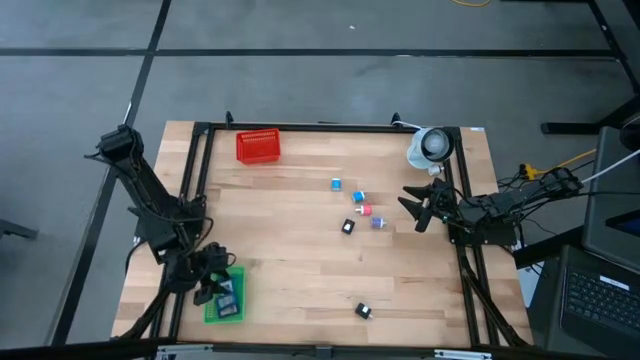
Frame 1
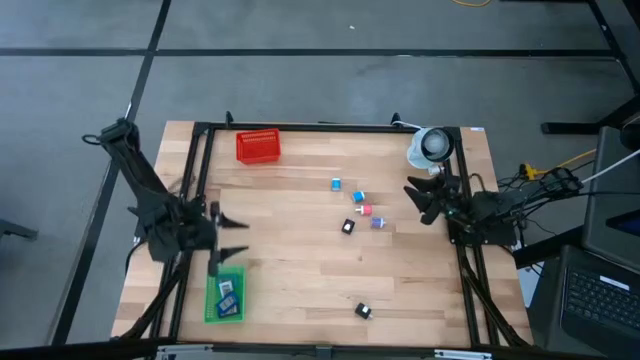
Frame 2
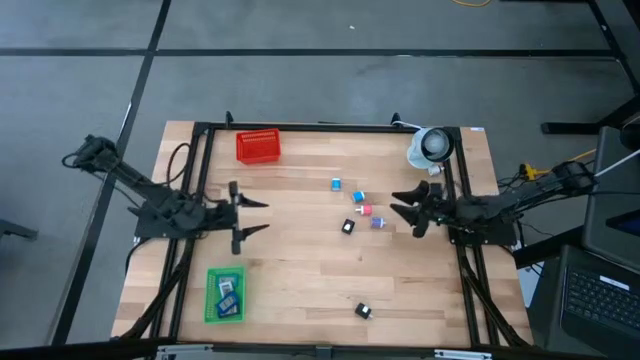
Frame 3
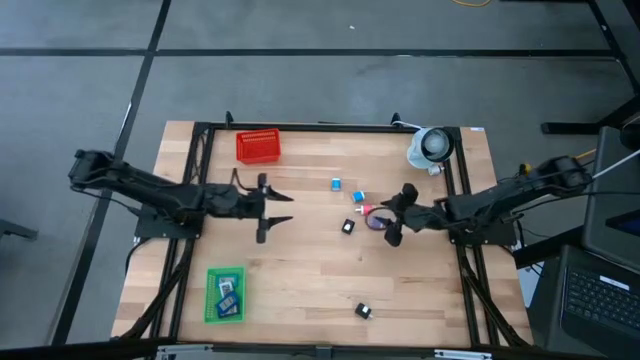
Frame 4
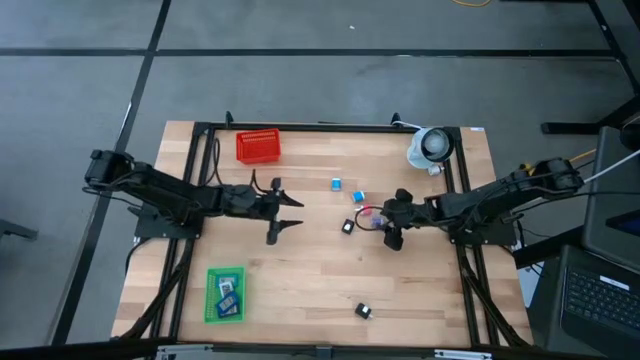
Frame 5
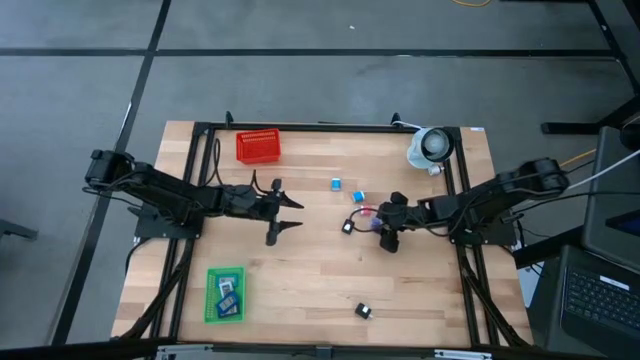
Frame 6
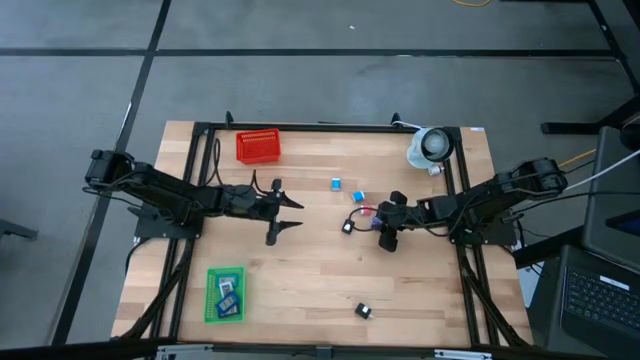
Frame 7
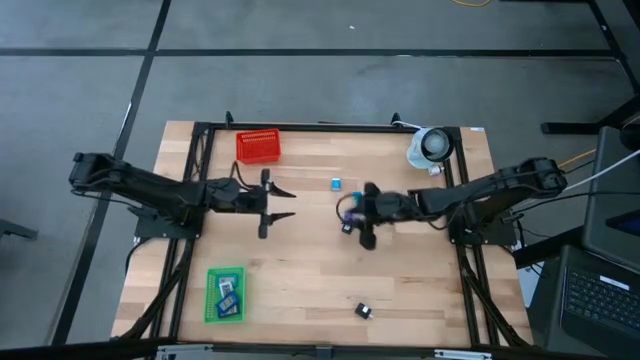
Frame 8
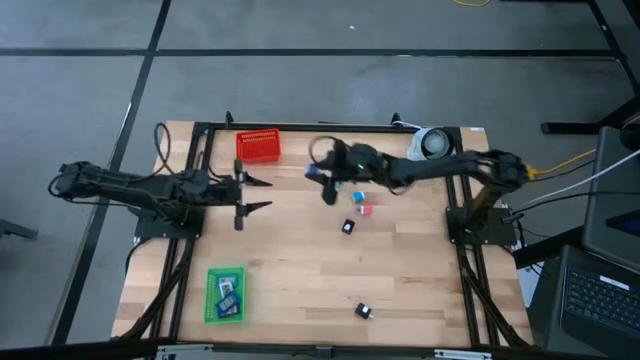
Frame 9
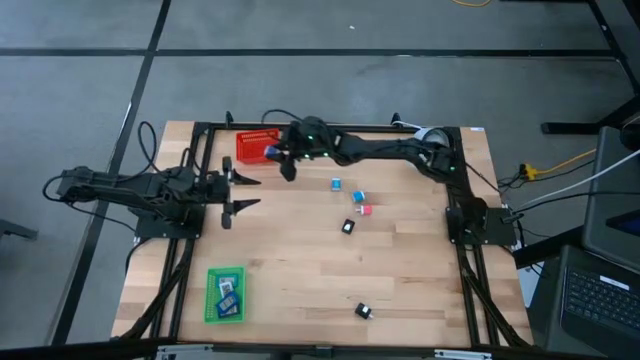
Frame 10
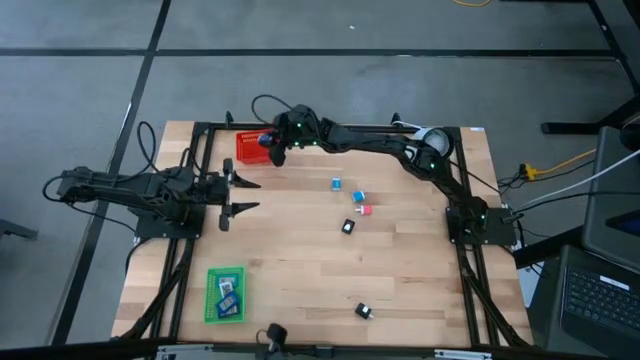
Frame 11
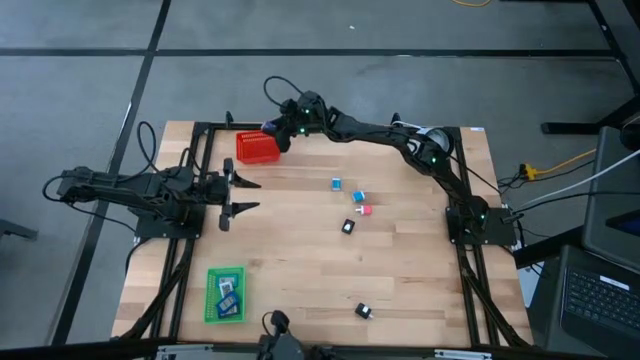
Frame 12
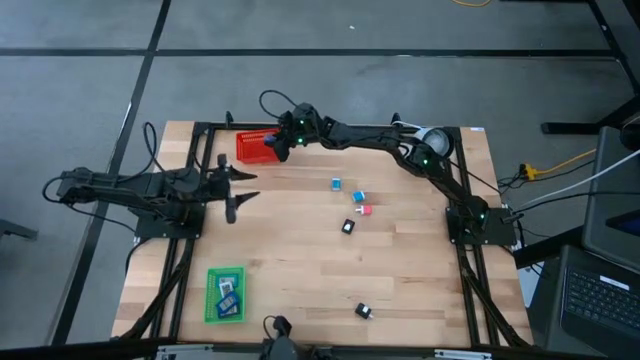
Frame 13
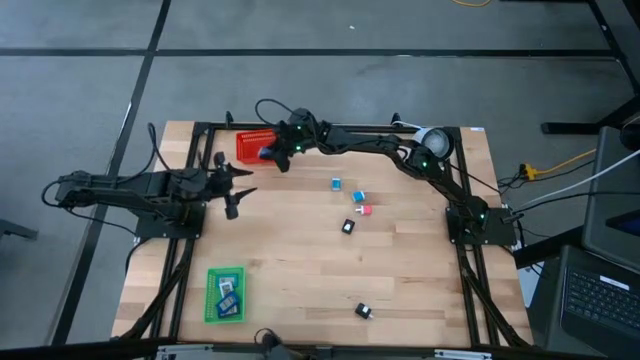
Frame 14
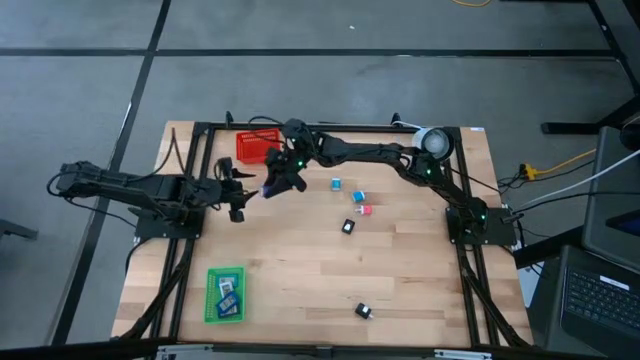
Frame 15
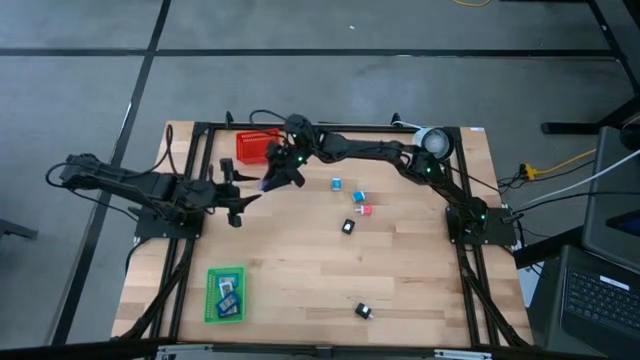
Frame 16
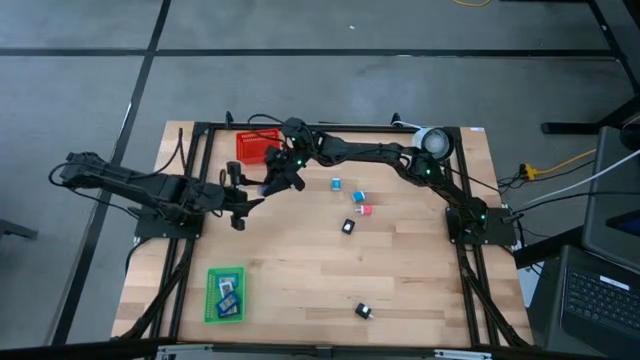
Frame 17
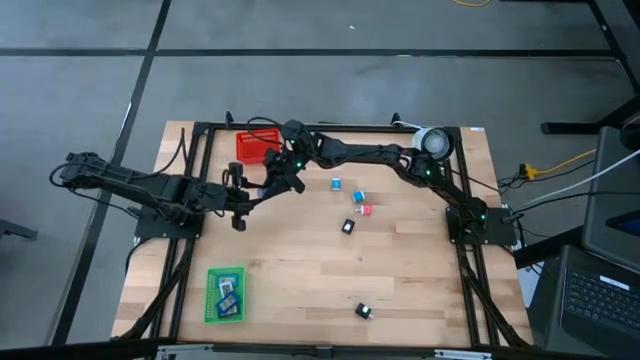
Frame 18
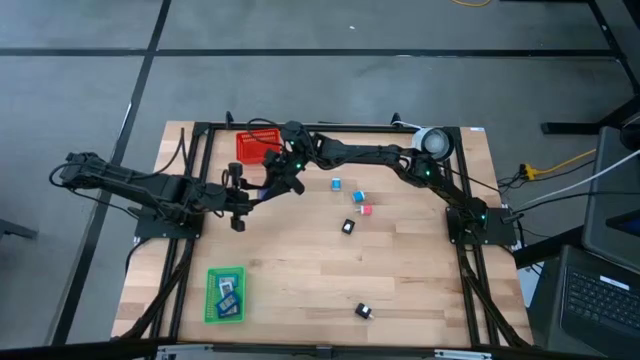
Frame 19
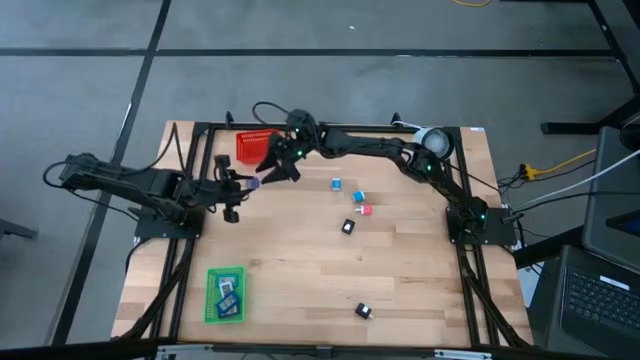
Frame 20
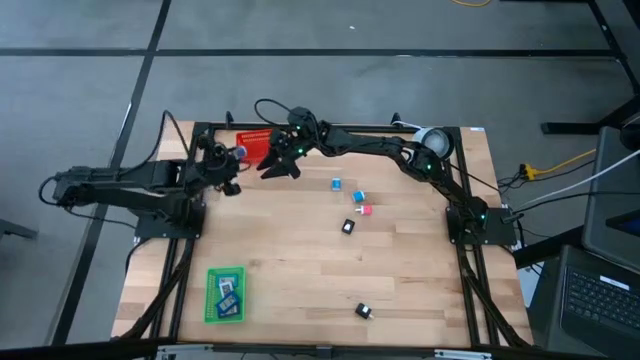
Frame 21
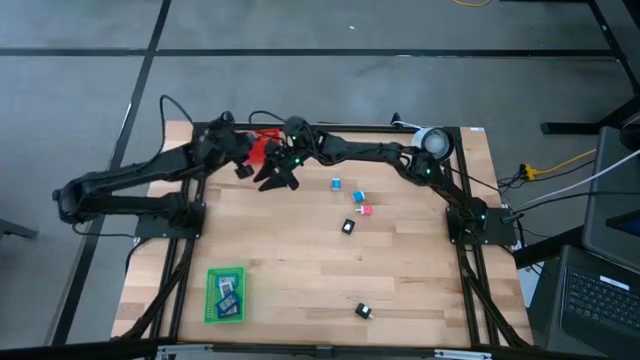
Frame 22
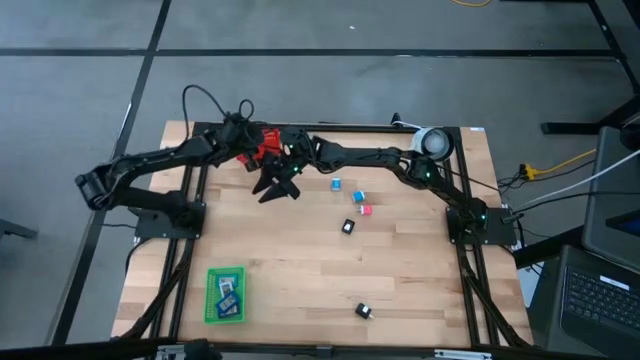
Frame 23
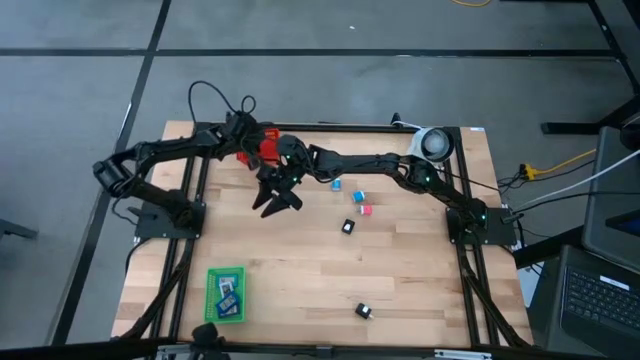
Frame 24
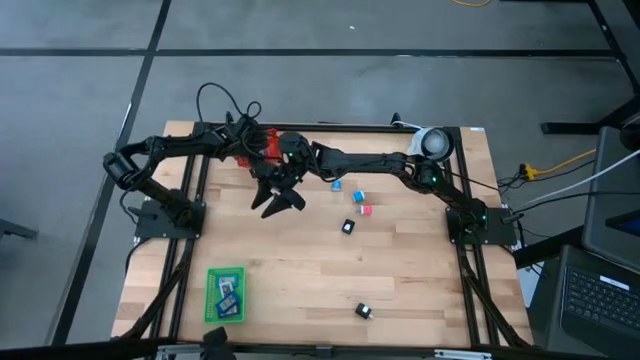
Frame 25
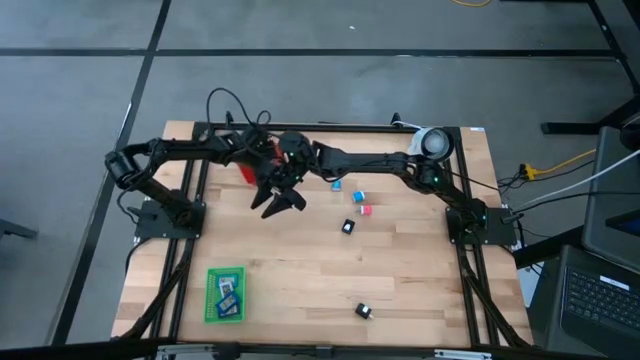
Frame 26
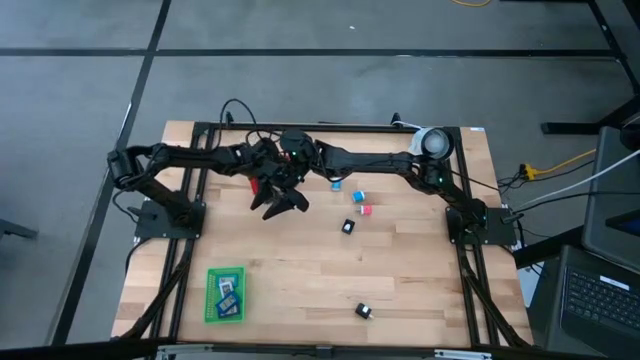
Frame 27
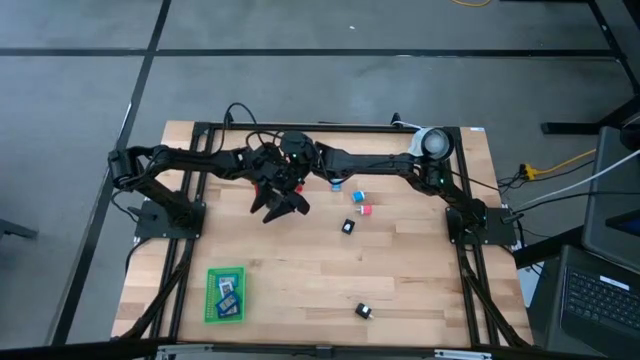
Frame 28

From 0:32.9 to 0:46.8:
Task: Pick & Place Office items
Put the violet charger adapter into the red bin

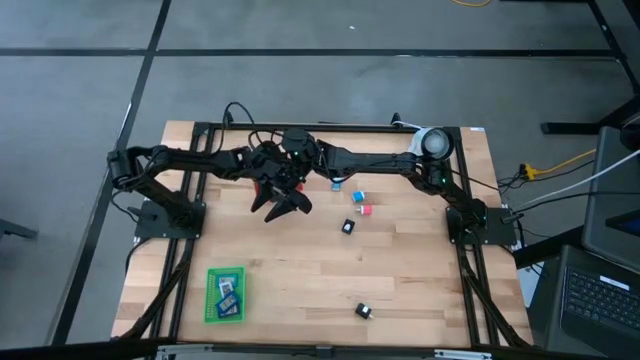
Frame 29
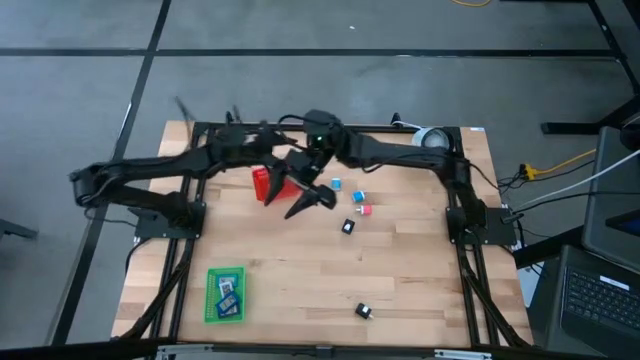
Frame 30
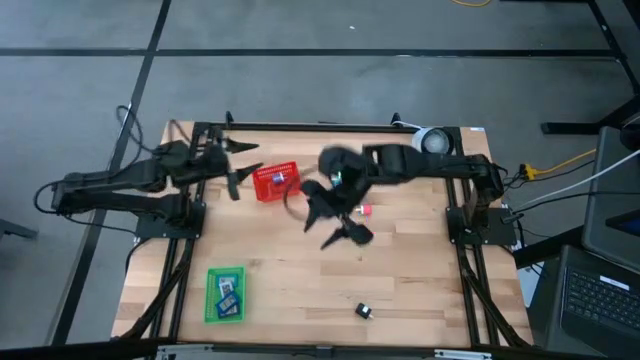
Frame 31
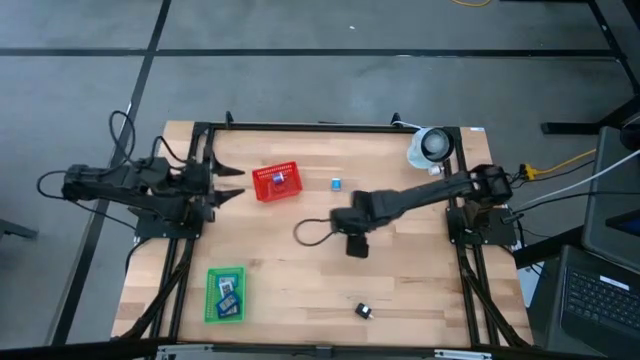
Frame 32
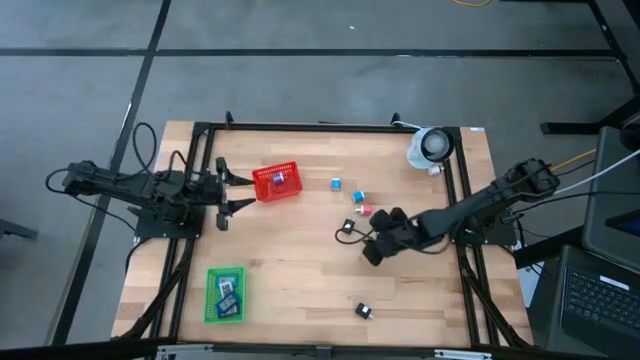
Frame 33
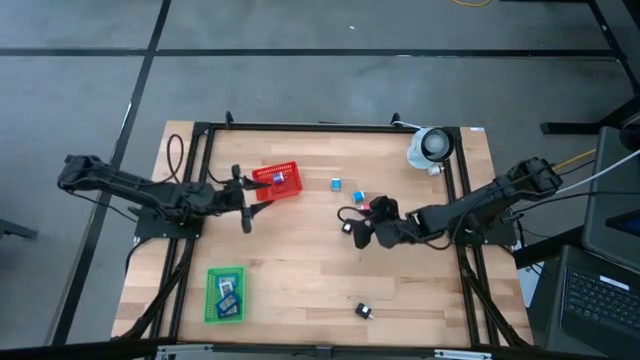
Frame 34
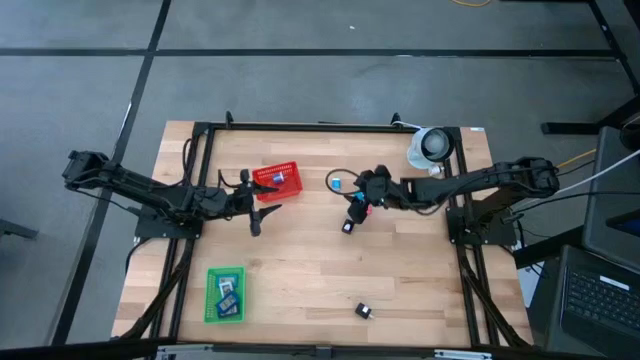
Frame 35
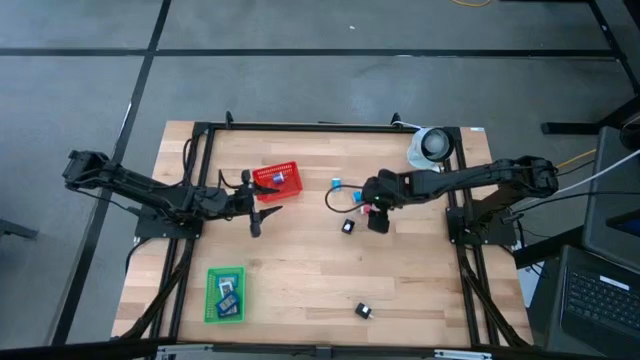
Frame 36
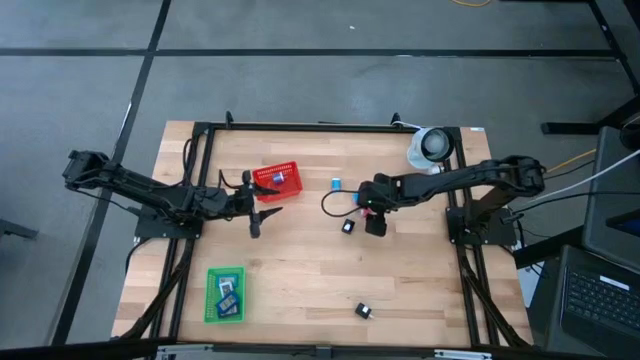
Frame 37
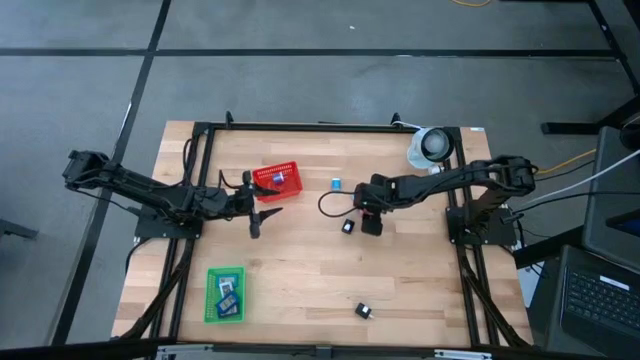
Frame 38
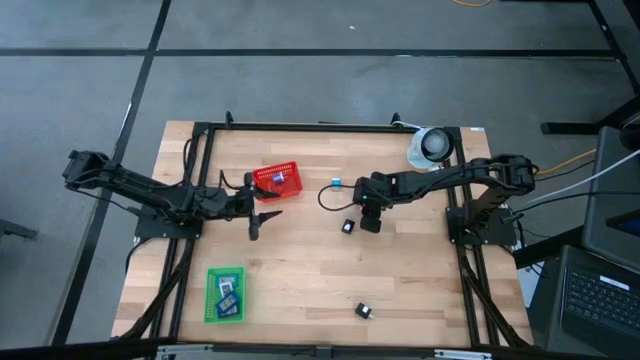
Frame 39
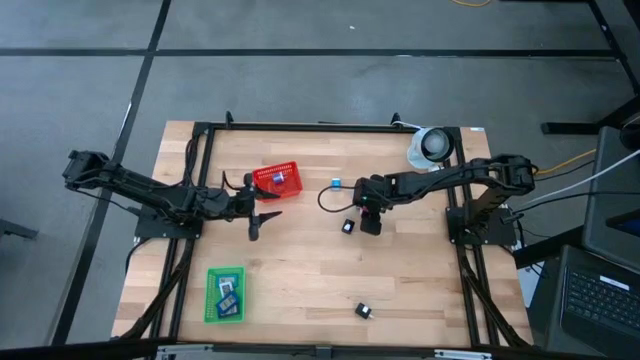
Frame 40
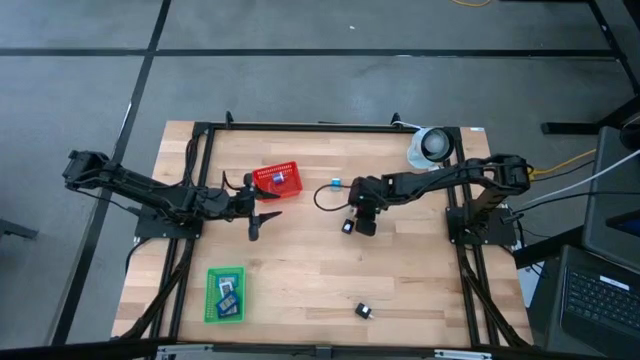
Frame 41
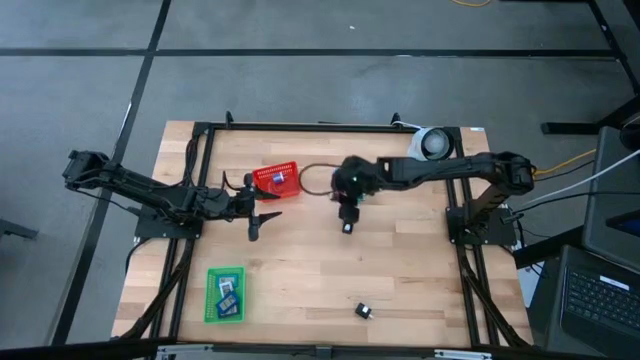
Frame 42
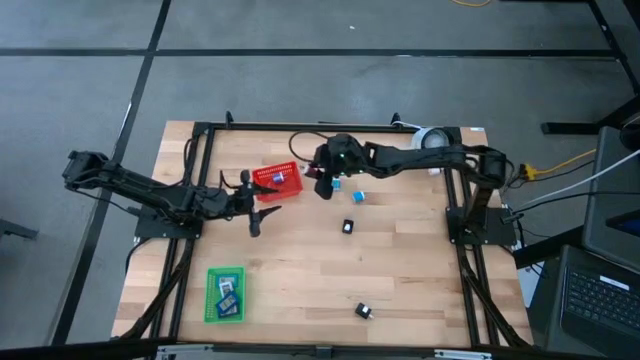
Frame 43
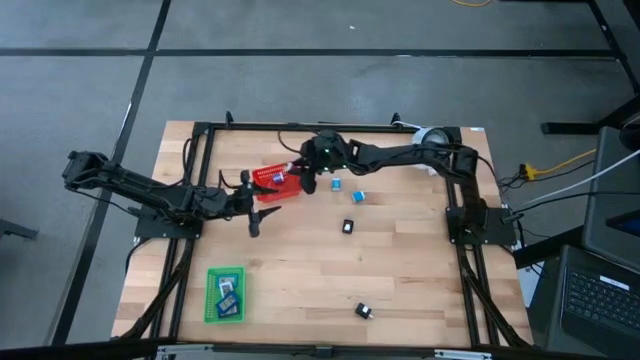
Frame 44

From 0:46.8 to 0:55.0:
Put the pink charger adapter into the red bin
